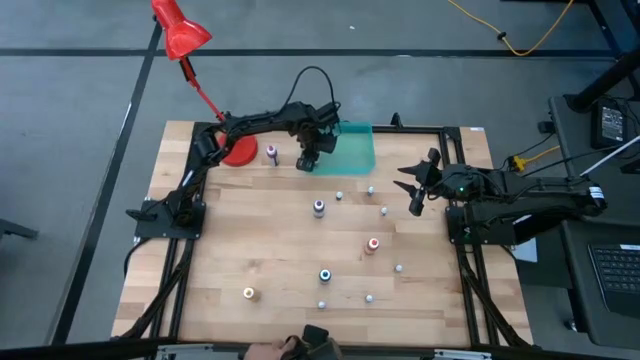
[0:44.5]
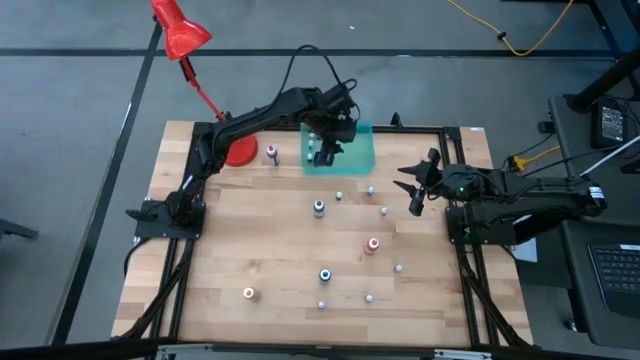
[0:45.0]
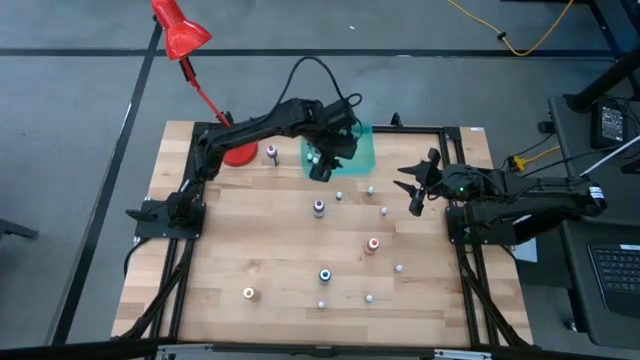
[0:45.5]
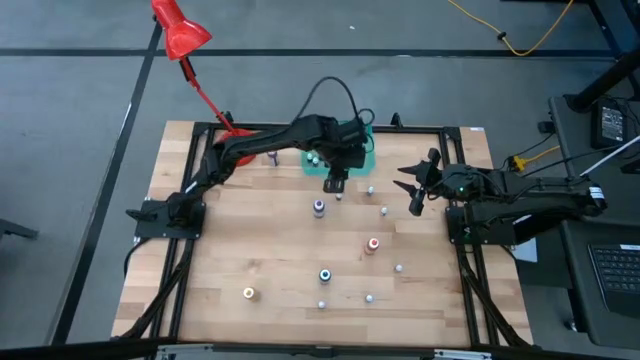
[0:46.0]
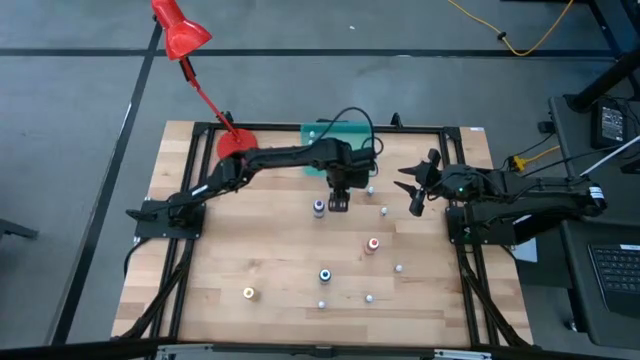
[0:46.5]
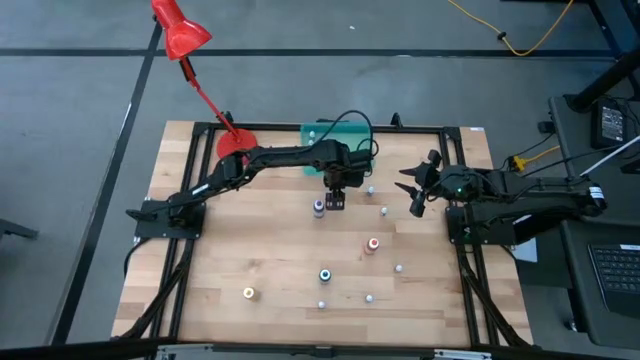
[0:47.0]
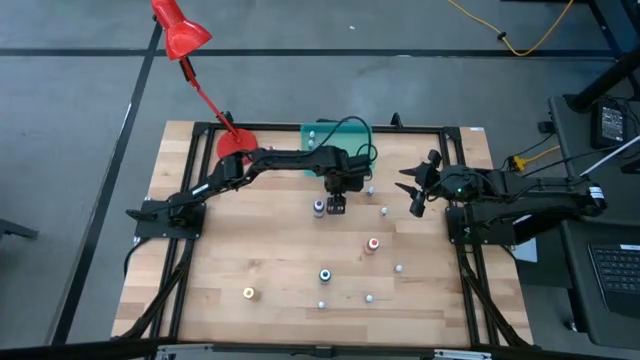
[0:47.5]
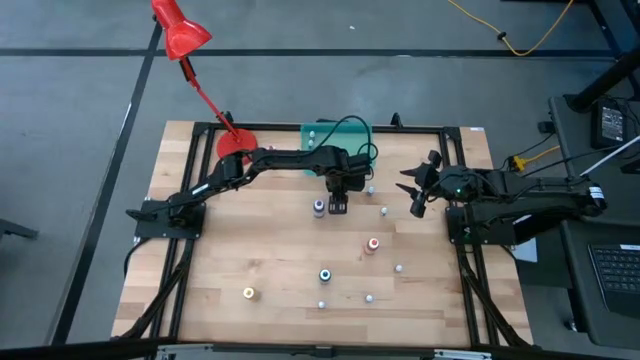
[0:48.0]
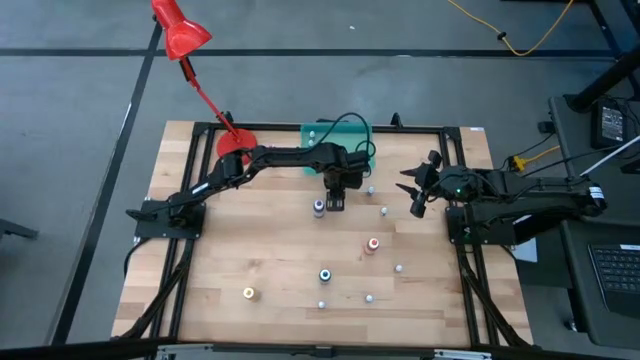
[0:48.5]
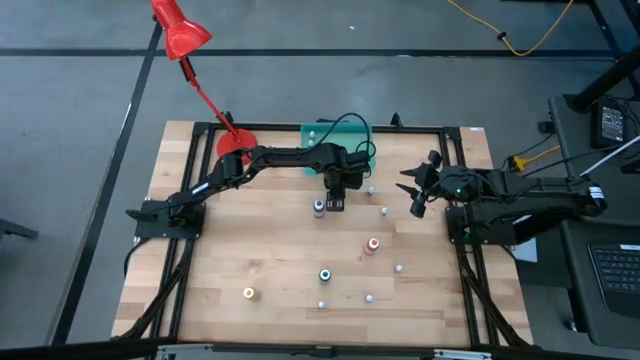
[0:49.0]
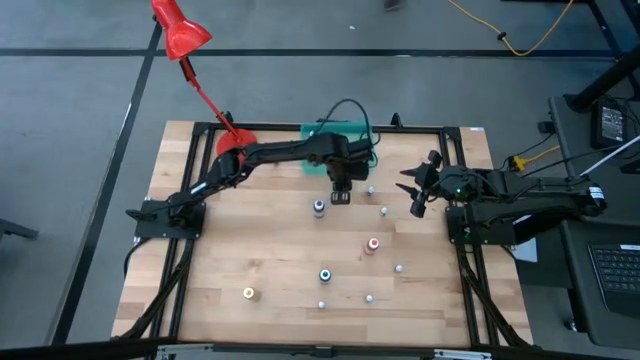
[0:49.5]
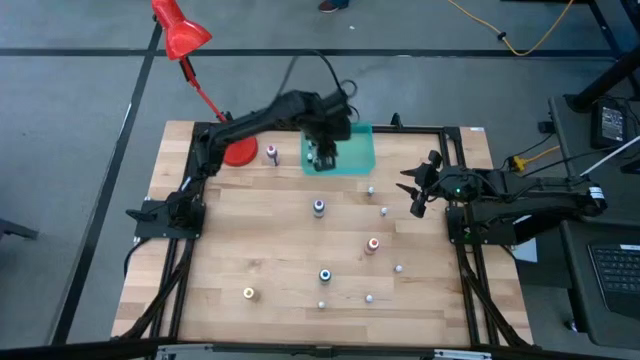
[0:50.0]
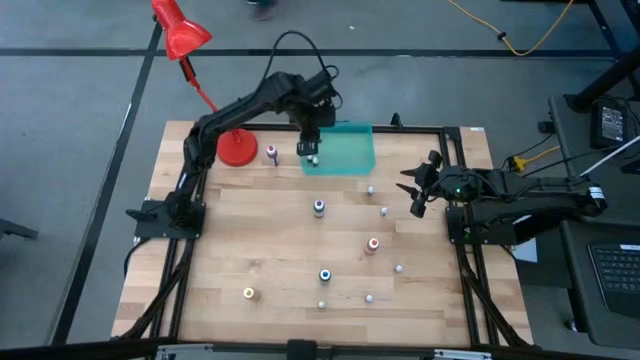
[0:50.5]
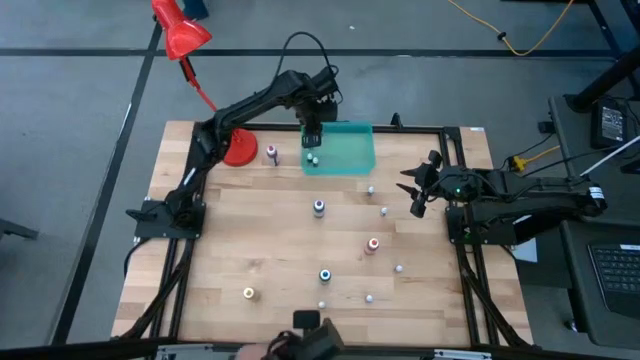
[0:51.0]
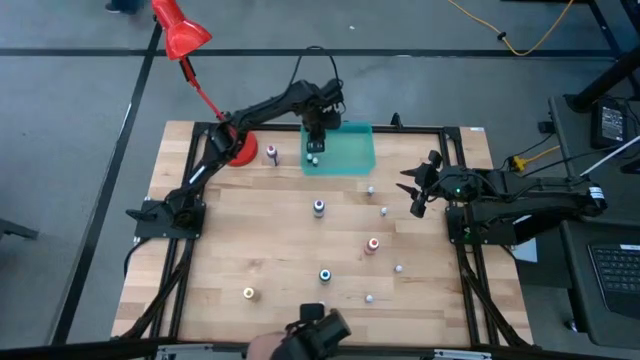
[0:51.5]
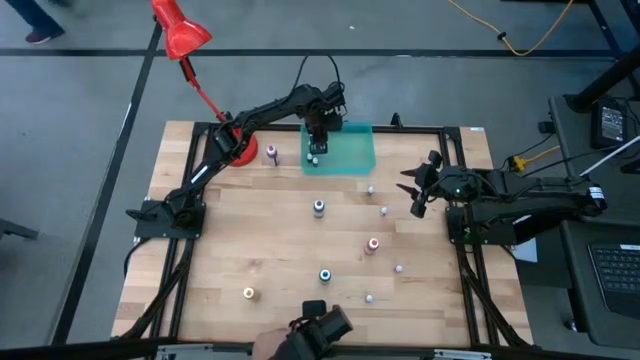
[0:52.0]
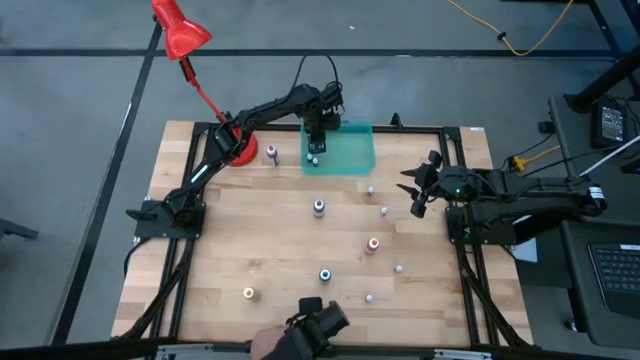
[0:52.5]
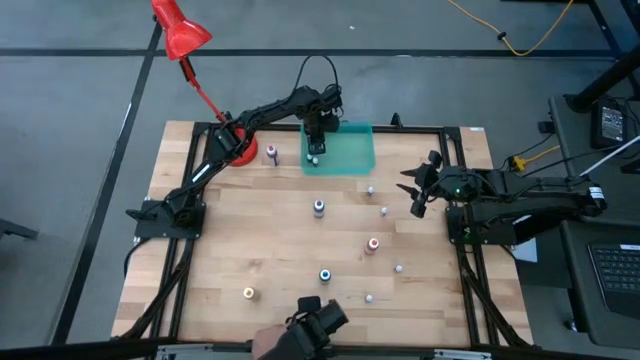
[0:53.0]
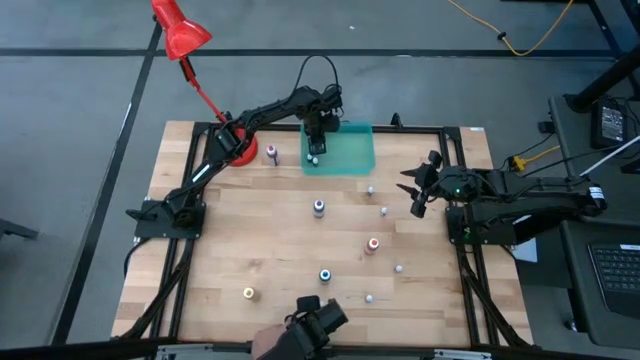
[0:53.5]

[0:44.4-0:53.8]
Task: Pick & Place food coloring
Put the small light green food coloring bottle into the green bin

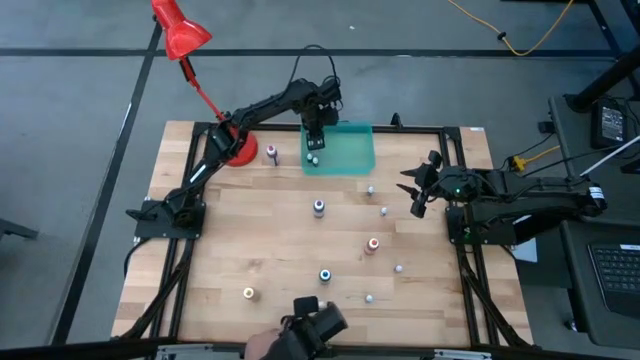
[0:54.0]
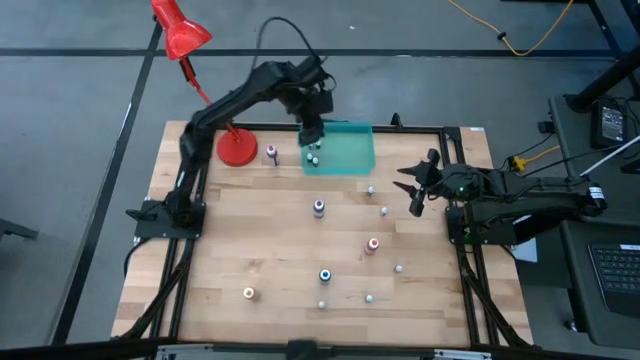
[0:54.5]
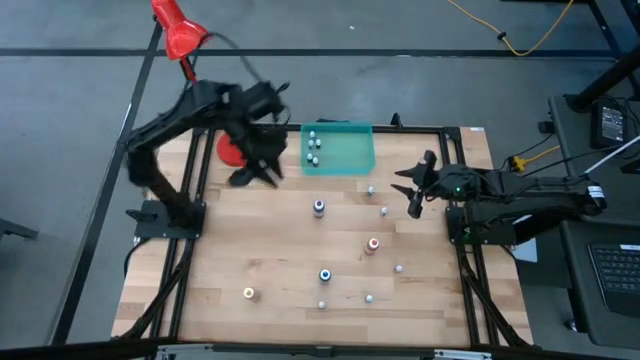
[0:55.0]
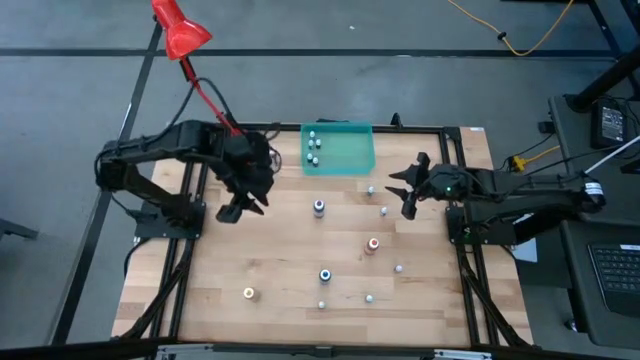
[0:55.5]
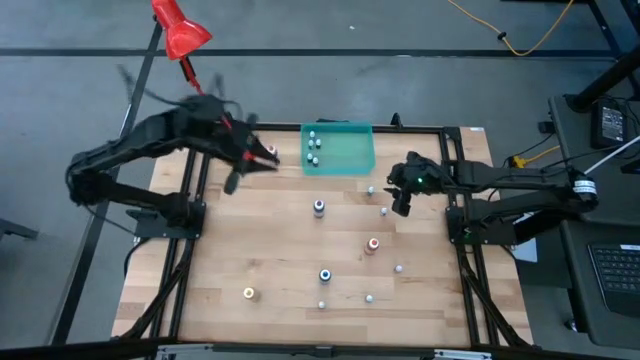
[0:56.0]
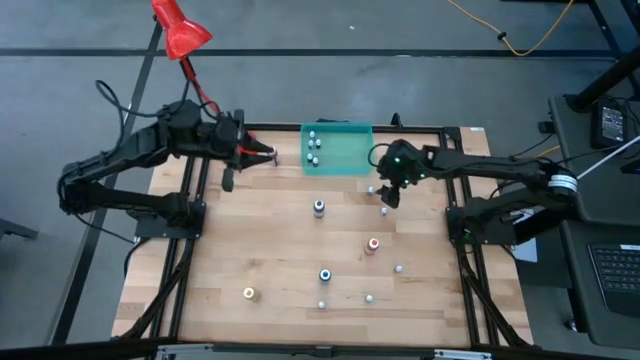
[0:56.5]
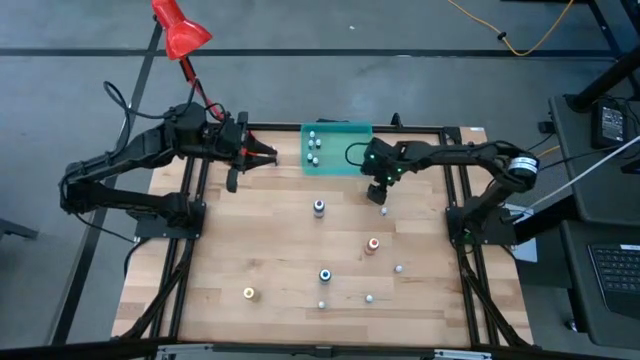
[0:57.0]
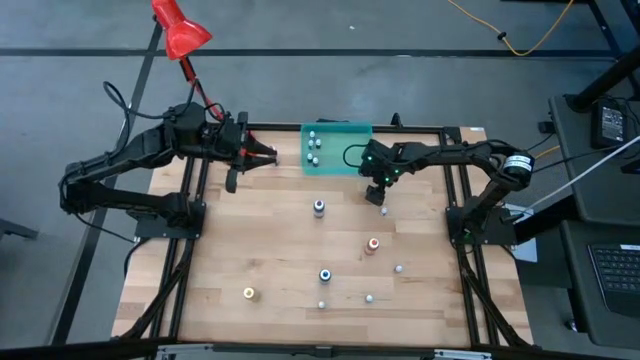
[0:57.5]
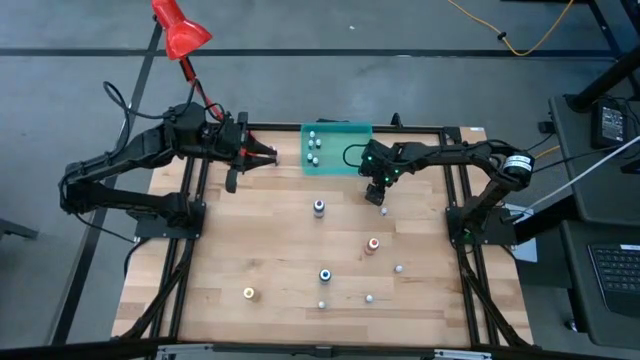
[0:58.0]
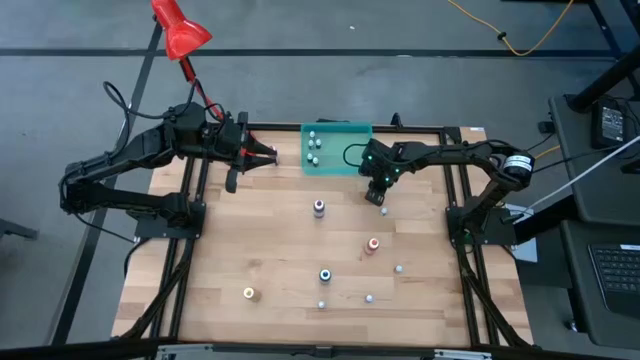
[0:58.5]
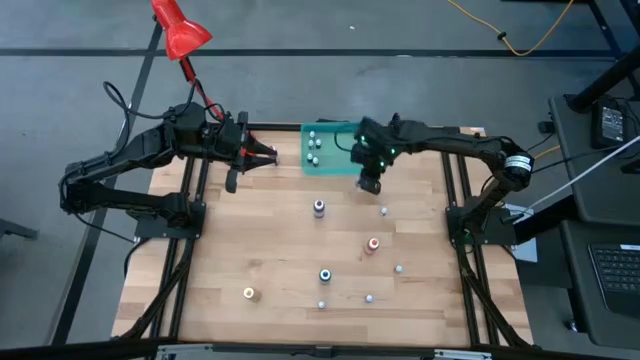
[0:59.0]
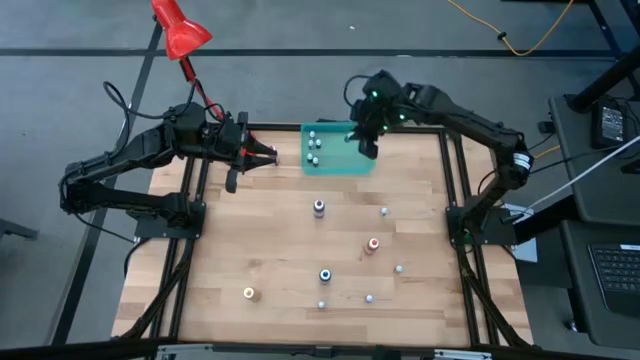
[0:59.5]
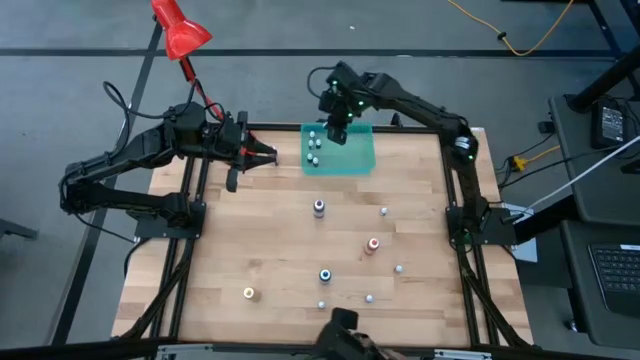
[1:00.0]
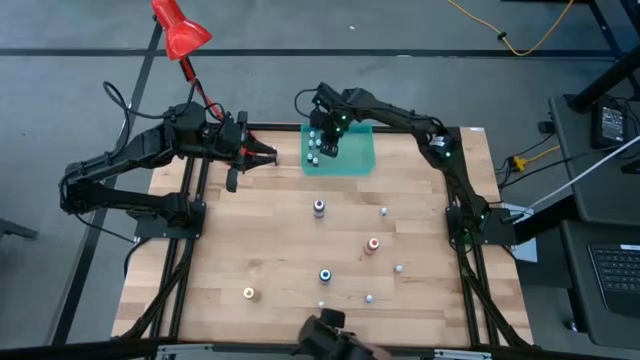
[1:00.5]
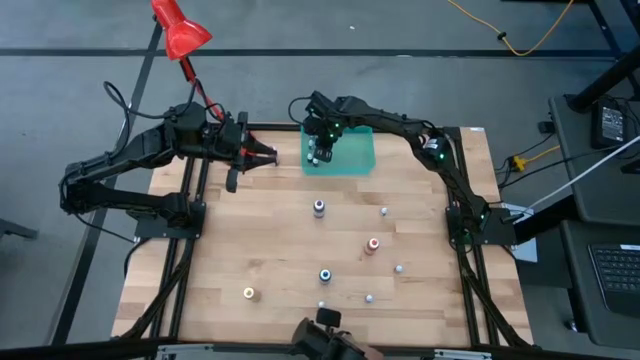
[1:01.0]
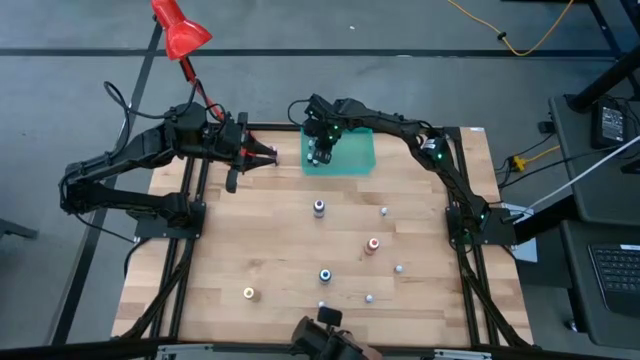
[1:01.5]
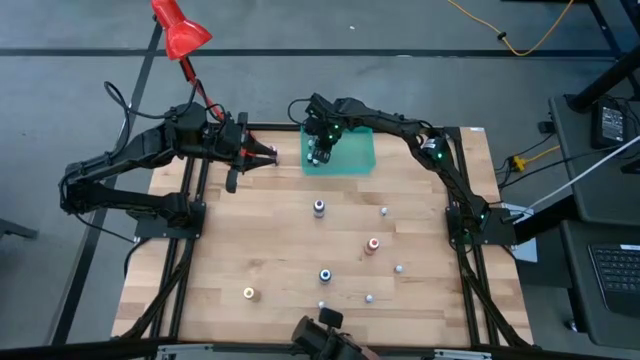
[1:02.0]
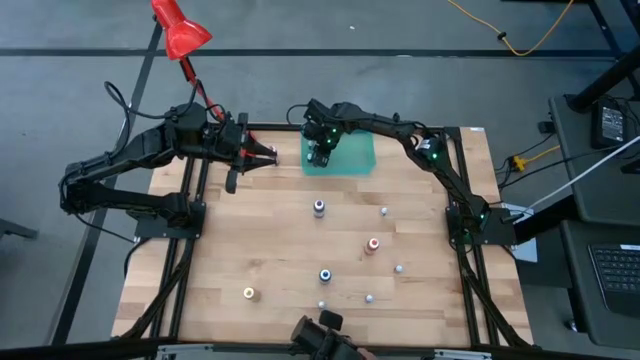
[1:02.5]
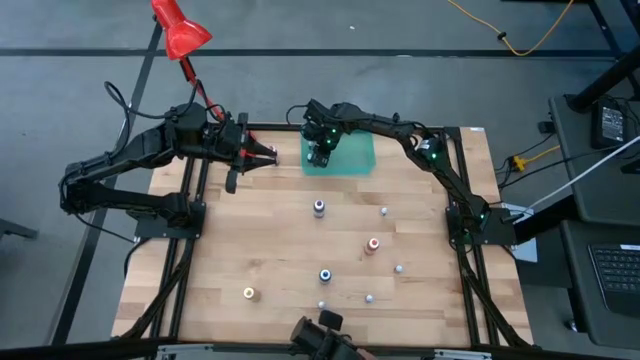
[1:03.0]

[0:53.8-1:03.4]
Put the small blue food coloring bottle into the green bin

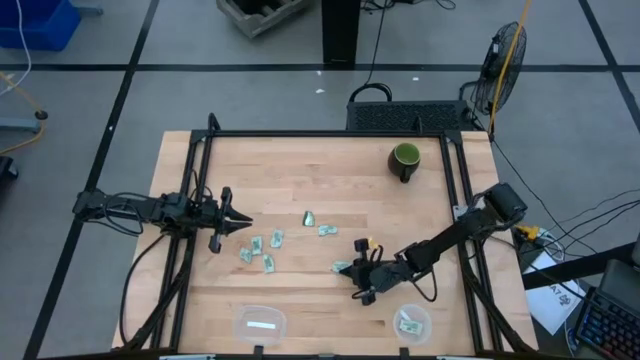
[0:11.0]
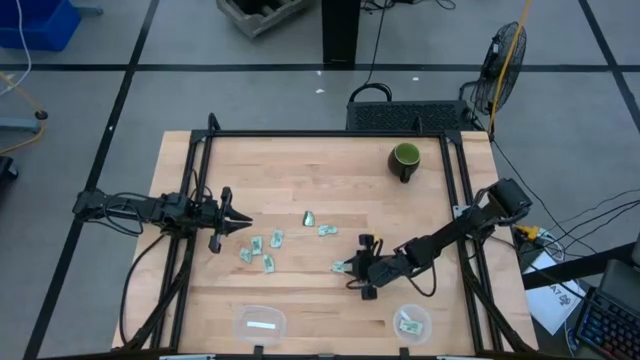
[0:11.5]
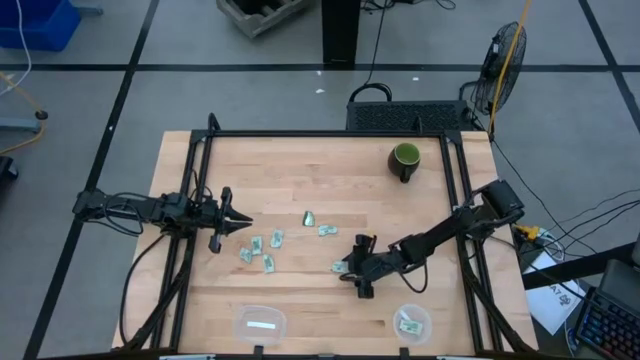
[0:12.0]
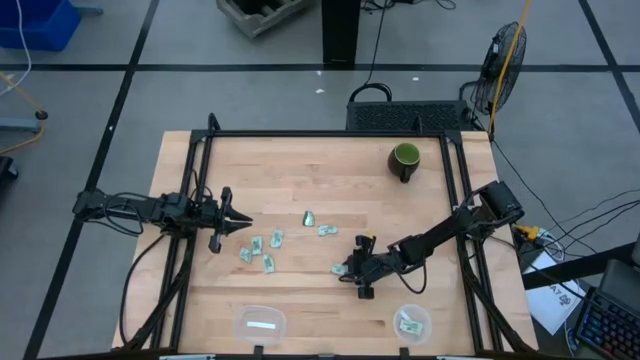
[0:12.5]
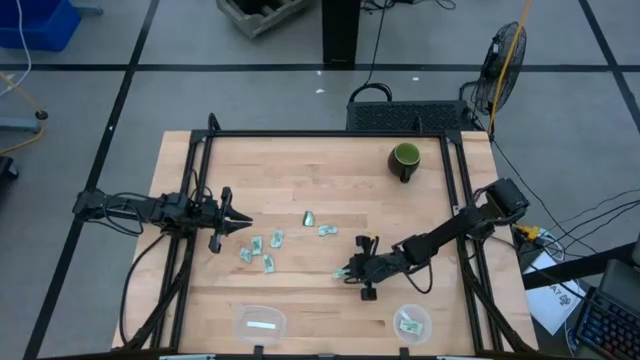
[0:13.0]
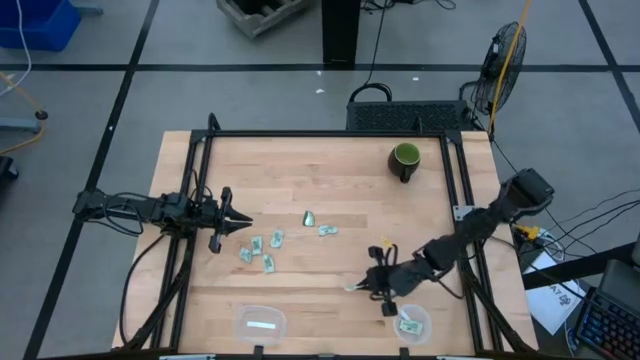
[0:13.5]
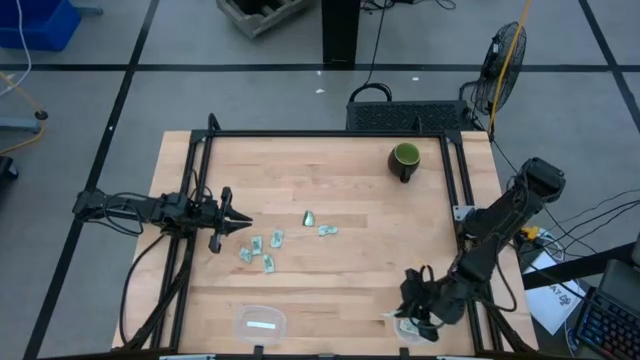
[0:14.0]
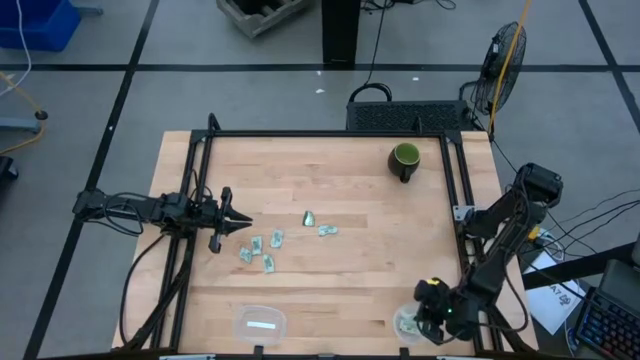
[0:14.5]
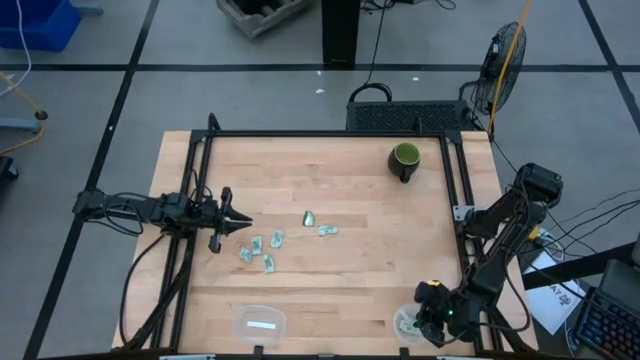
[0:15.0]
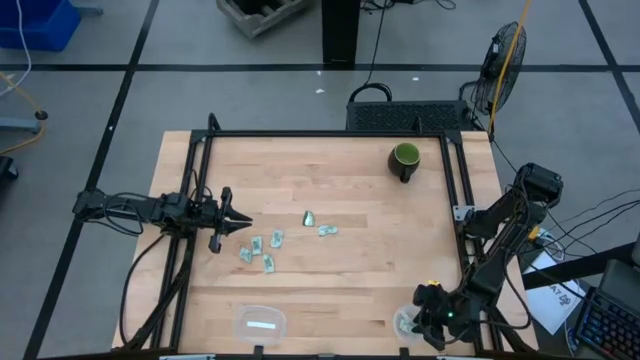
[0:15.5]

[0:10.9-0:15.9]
Task: Pick and place Stevia / Truvia into bins
Put the stevia packet into the right transparent container
